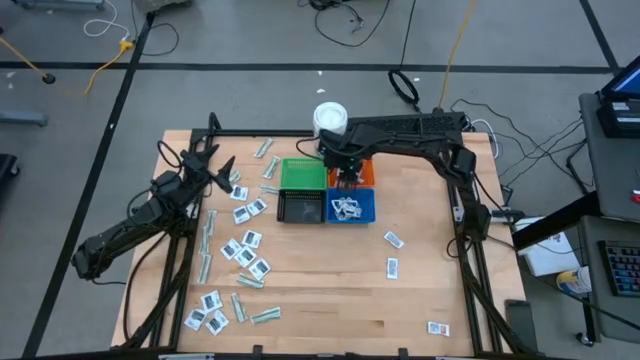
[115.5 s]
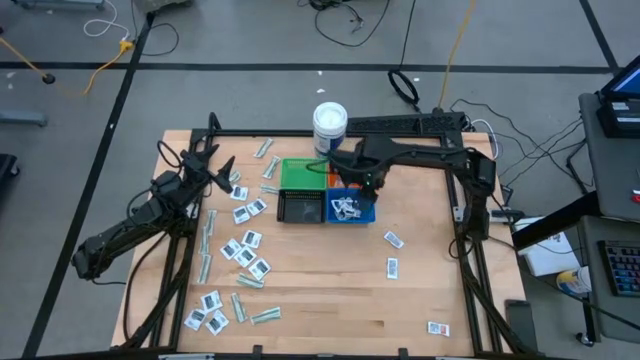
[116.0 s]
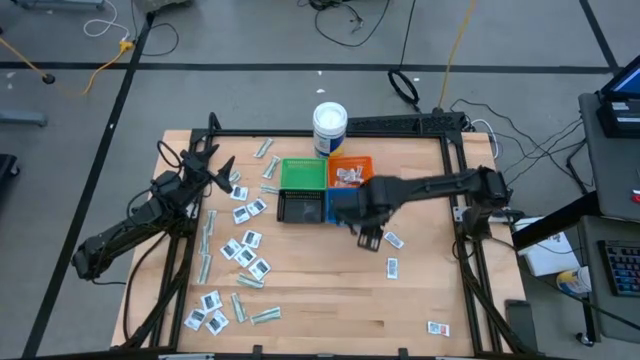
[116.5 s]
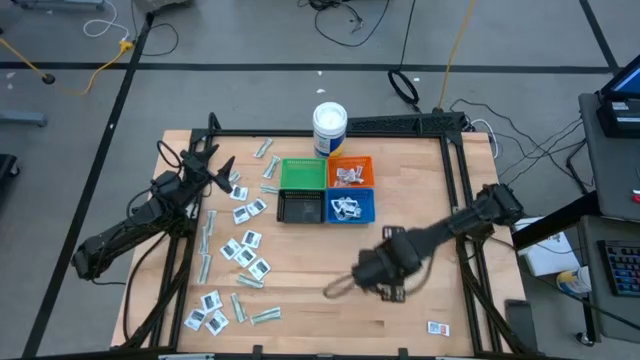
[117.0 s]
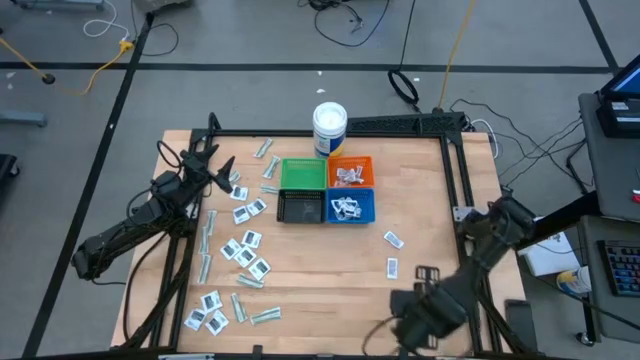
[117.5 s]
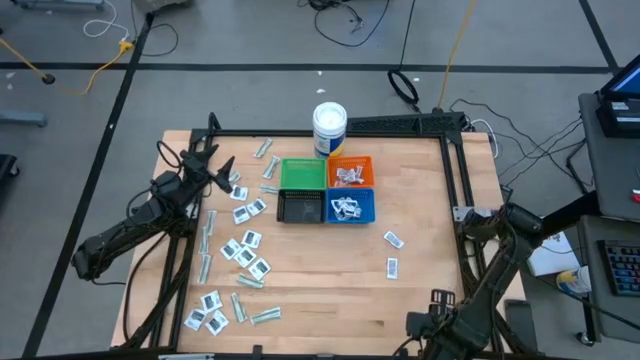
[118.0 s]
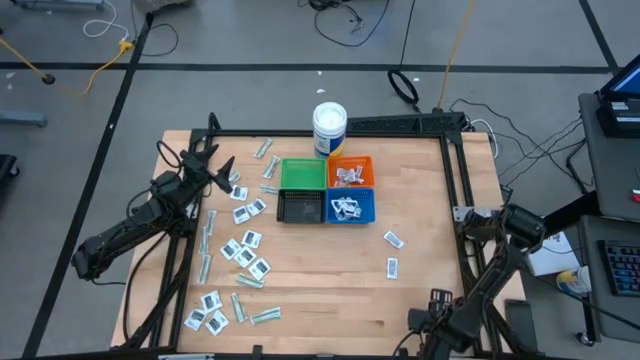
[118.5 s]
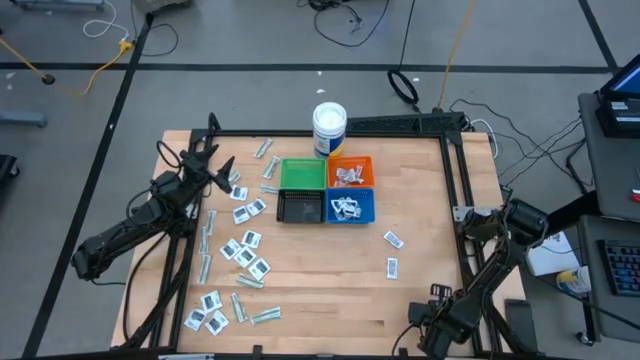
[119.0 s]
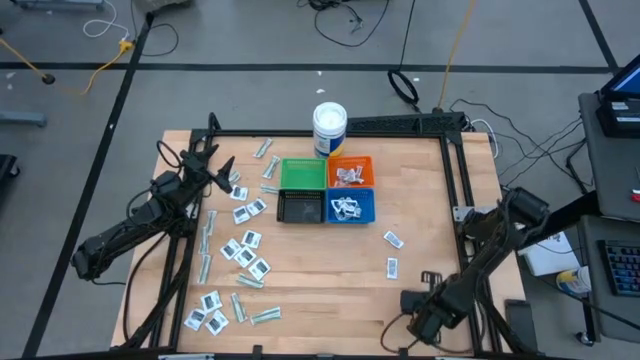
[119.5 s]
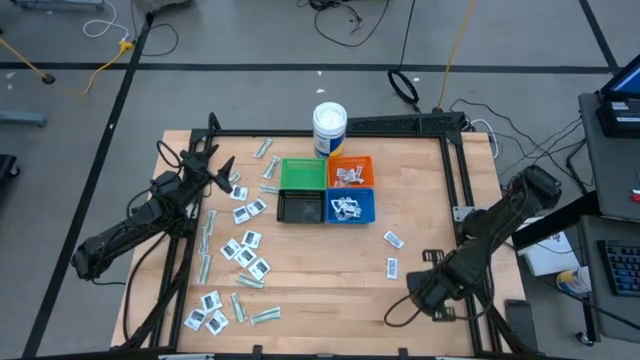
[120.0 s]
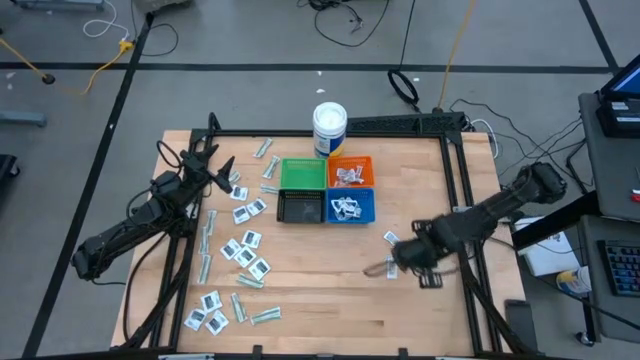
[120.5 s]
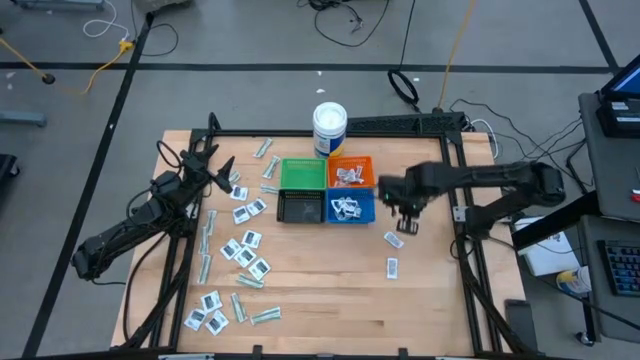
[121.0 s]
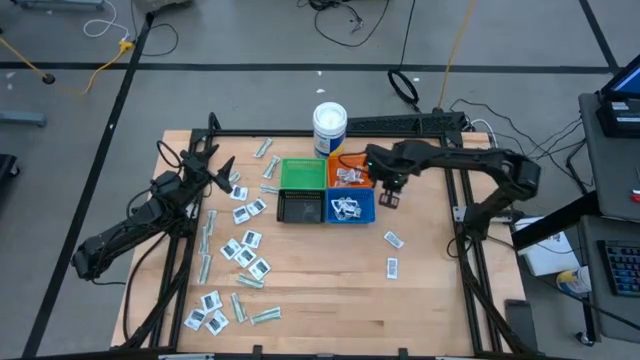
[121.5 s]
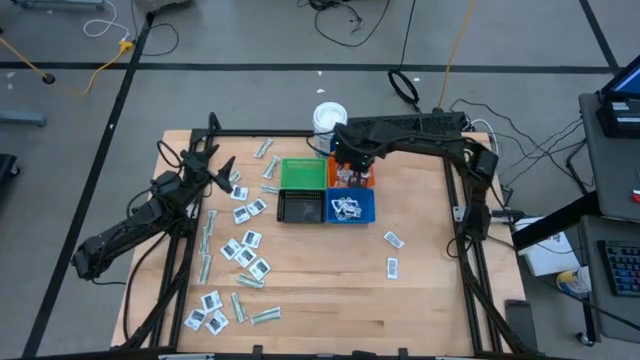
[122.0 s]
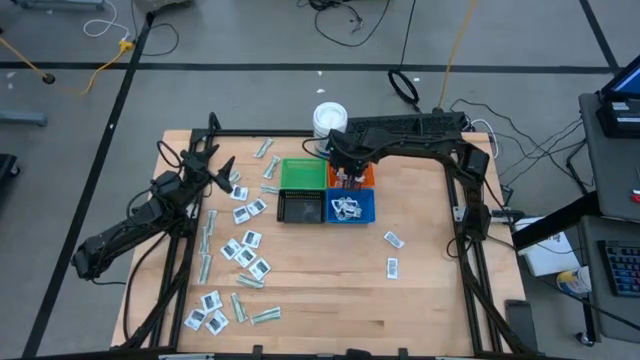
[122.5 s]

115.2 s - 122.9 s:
Task: Pick & Place First Aid Supplies
Put the orange ointment pack into the orange basket

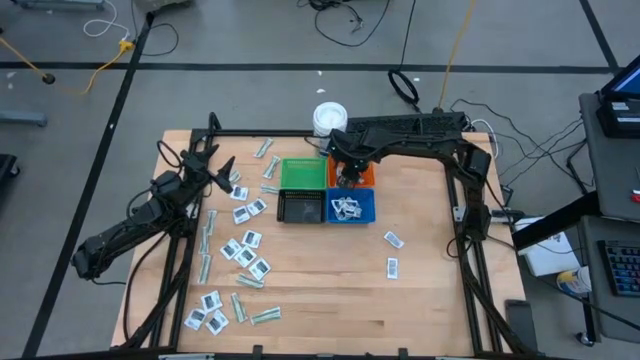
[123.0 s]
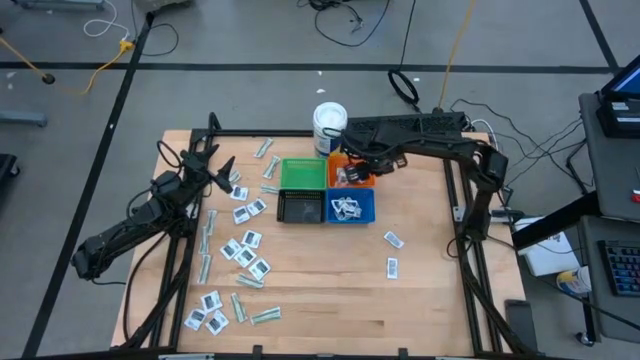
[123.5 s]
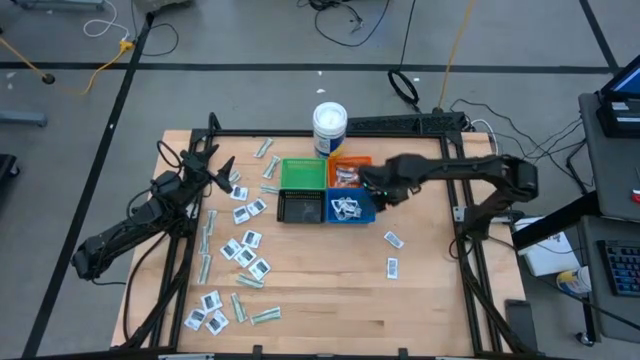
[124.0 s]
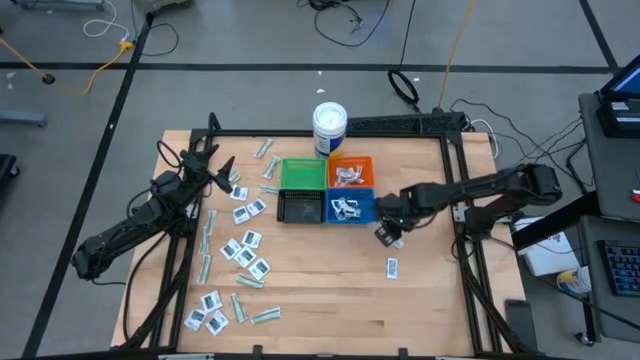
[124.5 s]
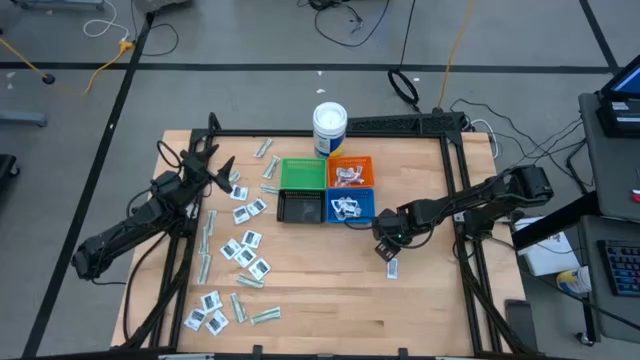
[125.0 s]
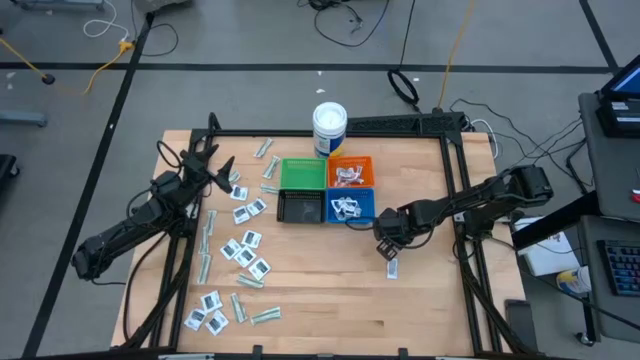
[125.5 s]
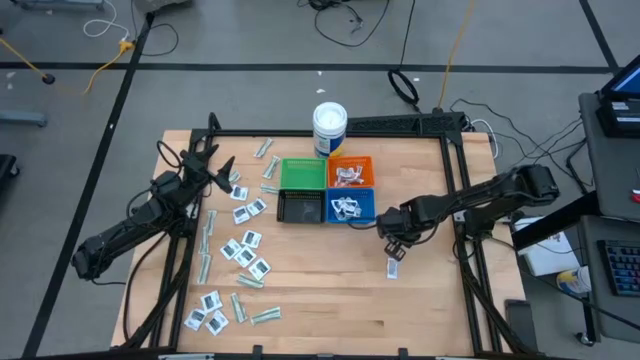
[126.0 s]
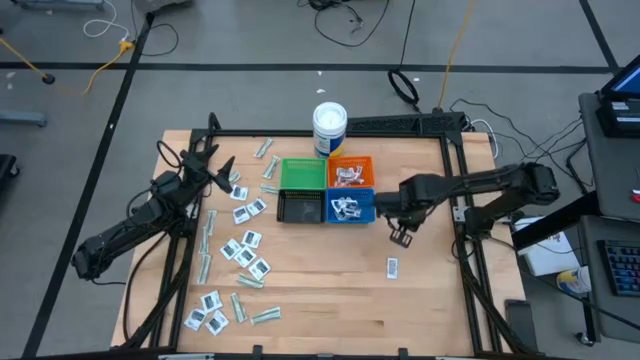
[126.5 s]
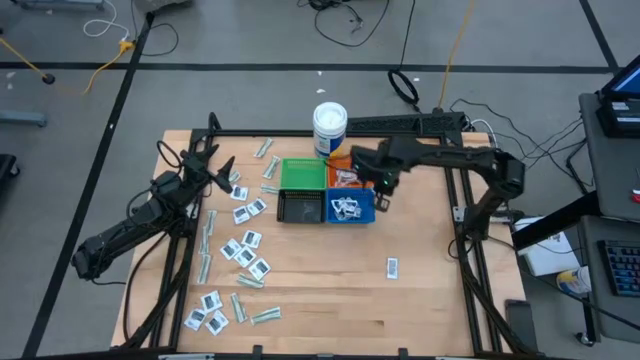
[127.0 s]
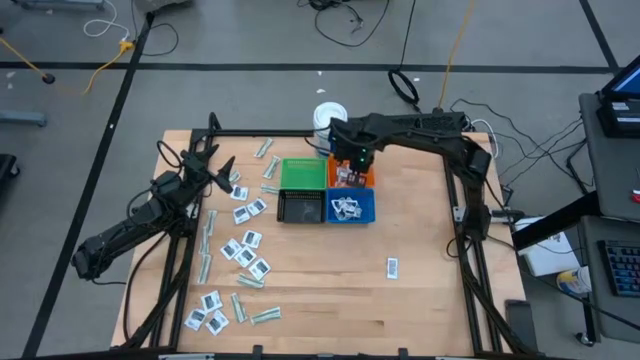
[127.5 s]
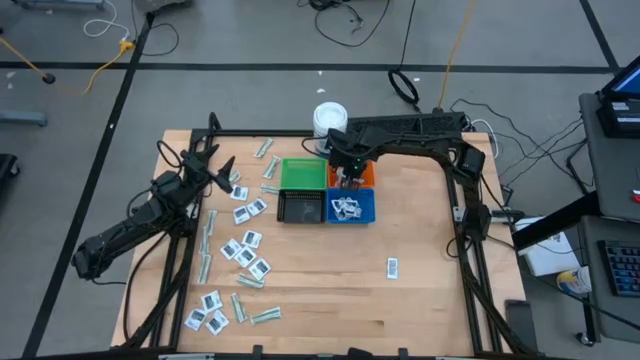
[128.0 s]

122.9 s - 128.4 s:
Put the orange ointment pack into the orange basket

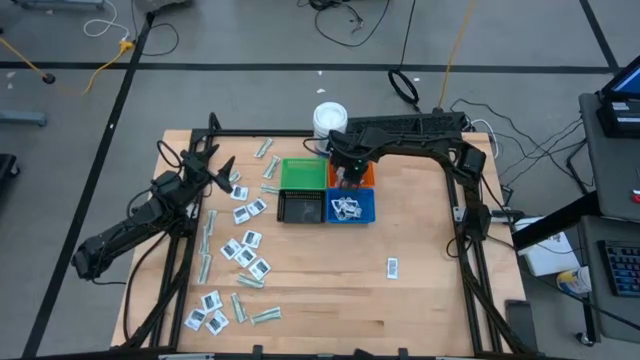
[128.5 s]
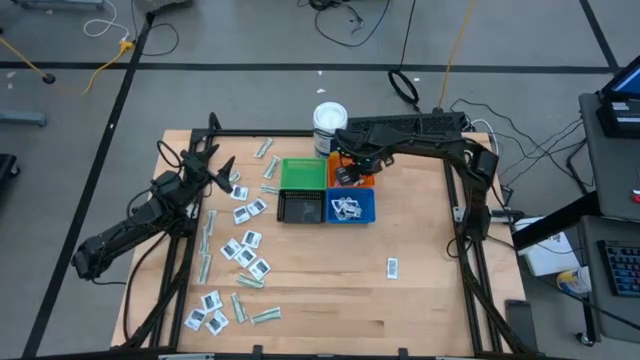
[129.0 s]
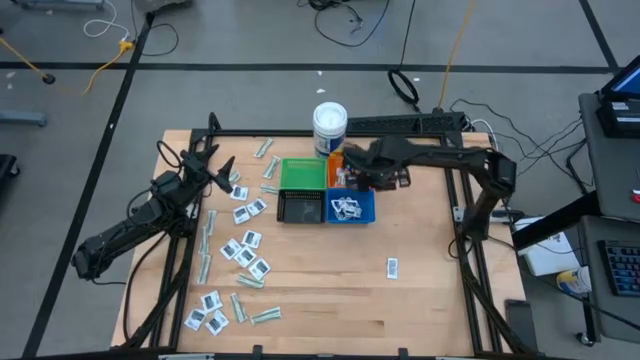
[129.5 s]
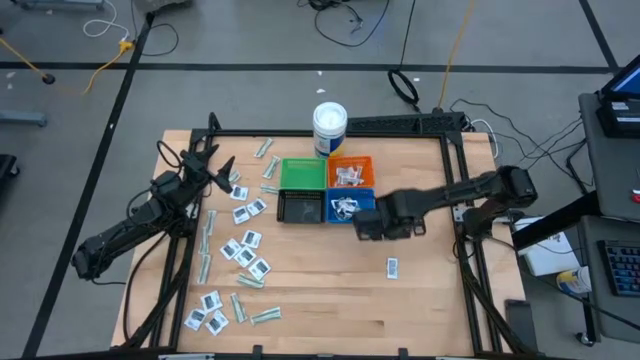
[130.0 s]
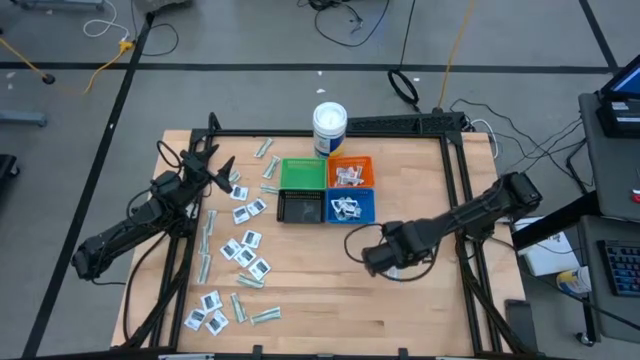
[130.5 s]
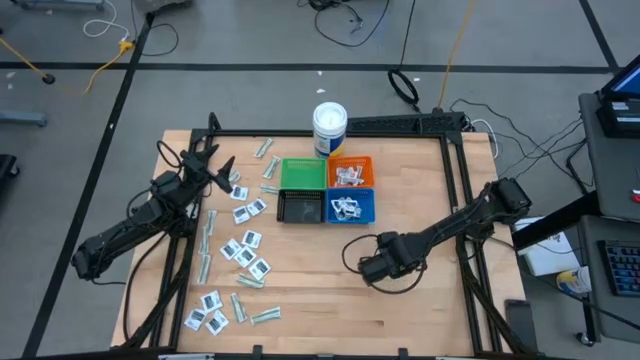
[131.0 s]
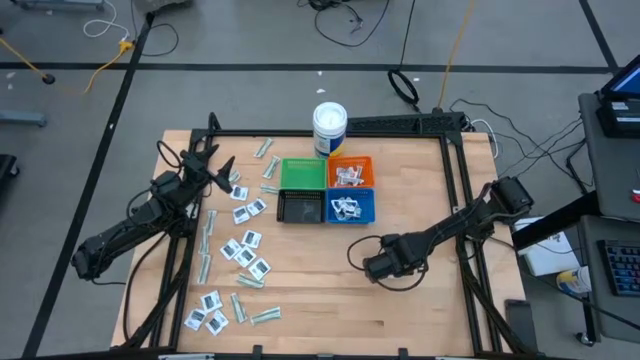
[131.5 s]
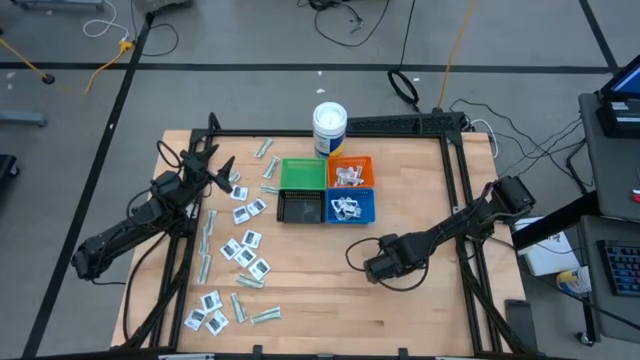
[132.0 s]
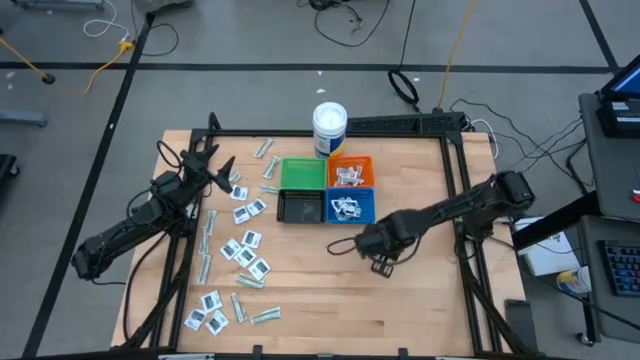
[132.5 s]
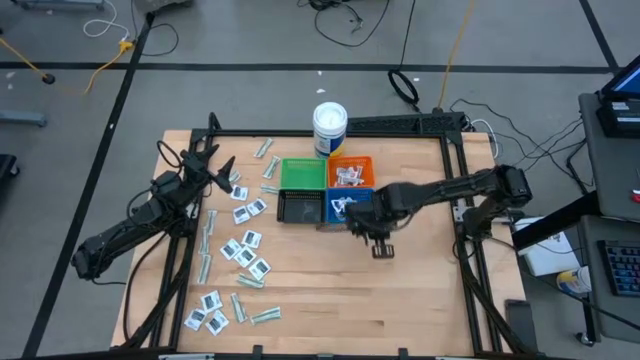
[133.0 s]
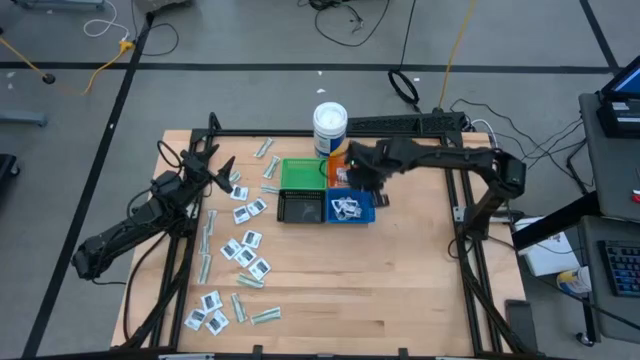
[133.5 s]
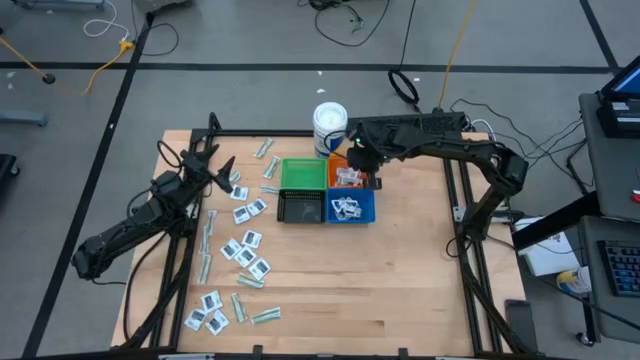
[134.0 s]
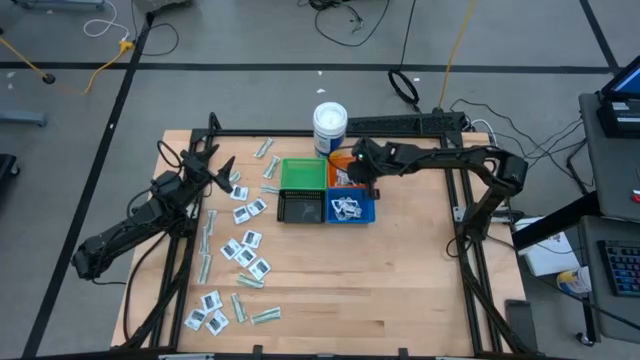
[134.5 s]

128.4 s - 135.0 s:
Put the orange ointment pack into the orange basket

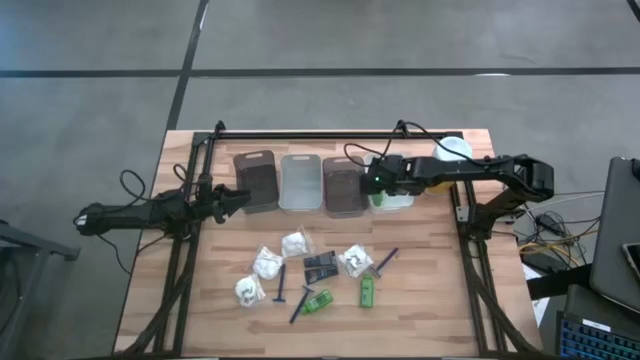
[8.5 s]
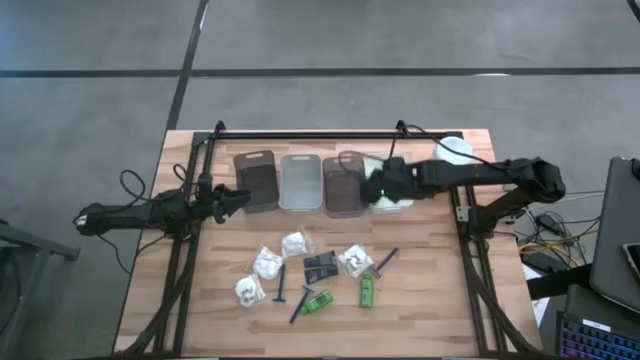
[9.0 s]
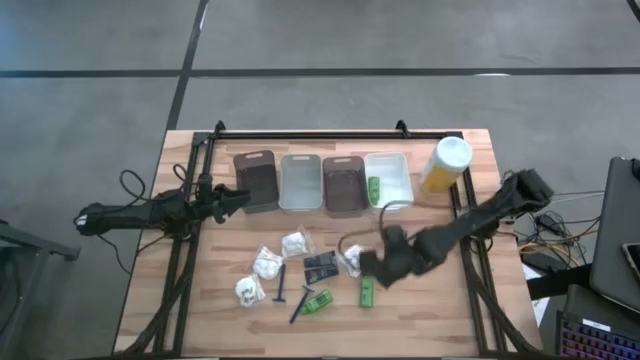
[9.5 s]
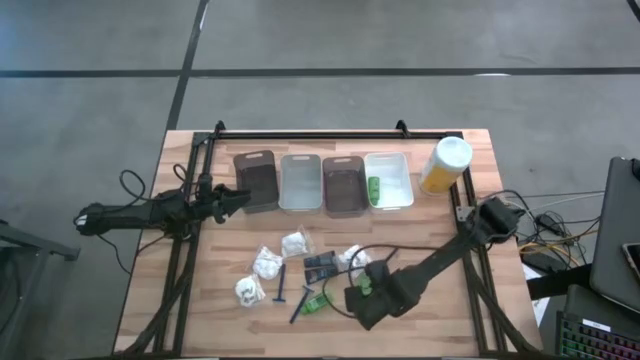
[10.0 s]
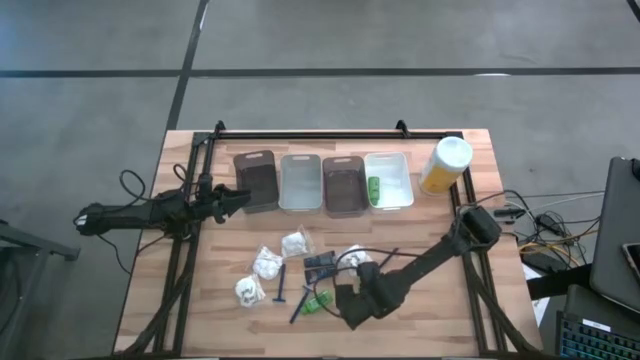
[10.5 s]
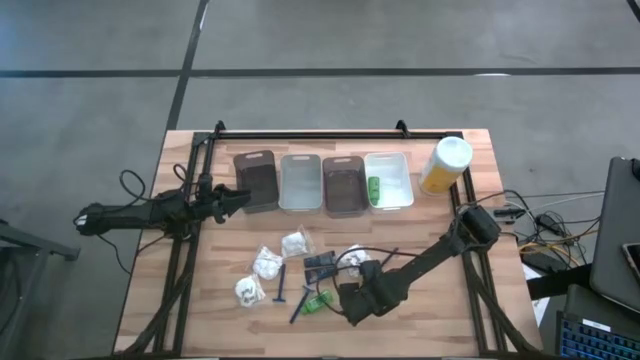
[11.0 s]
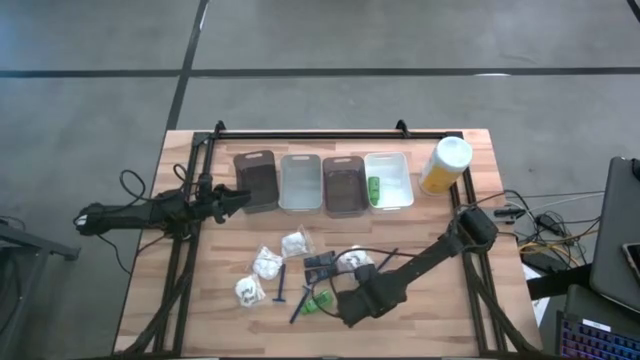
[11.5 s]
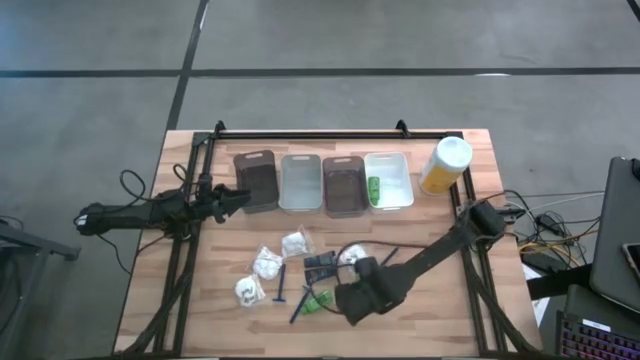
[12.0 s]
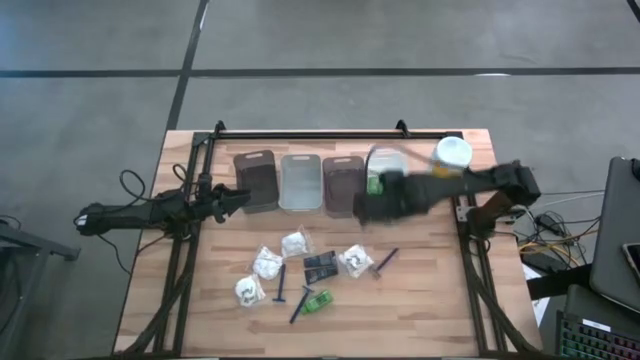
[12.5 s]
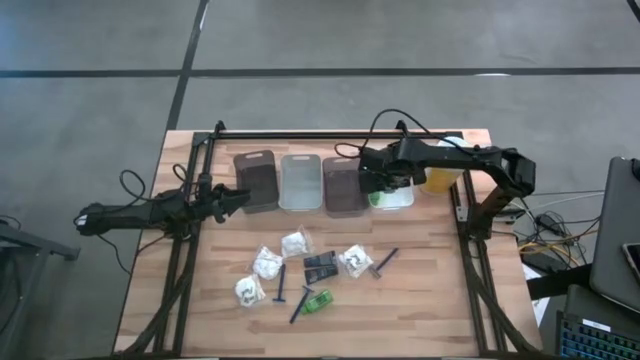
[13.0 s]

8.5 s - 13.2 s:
Task: Pick & Place Travel size toiletries
Put the green shampoo into the white bin
